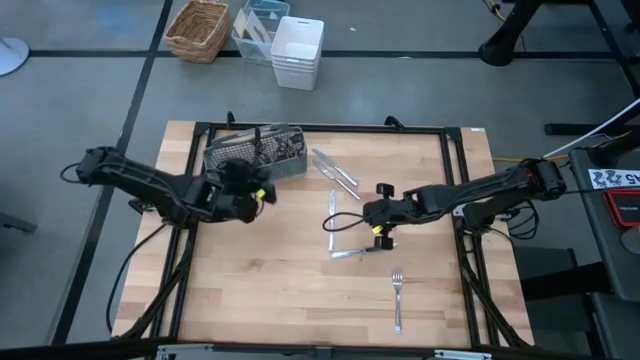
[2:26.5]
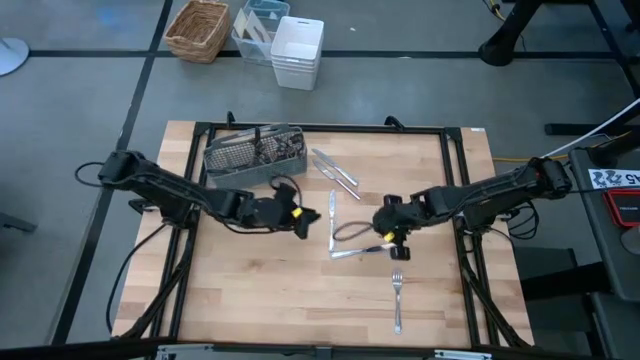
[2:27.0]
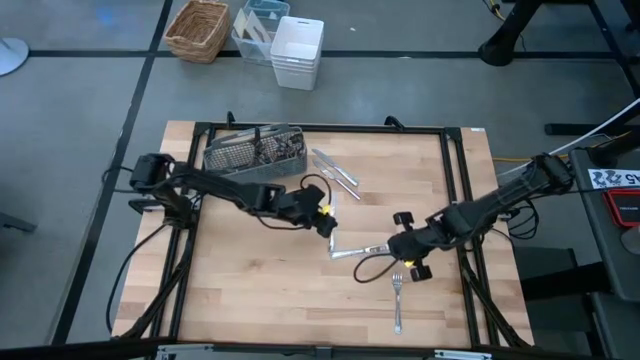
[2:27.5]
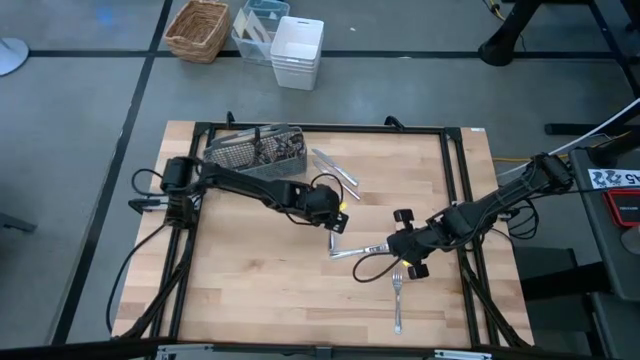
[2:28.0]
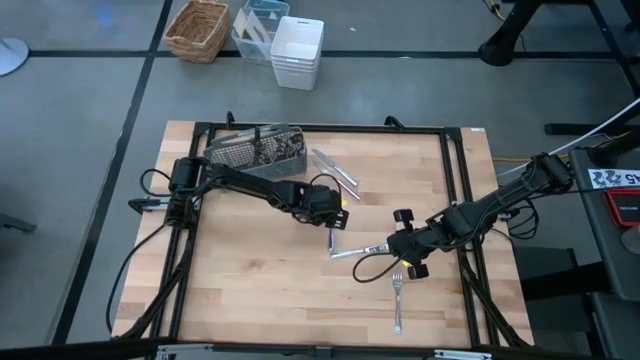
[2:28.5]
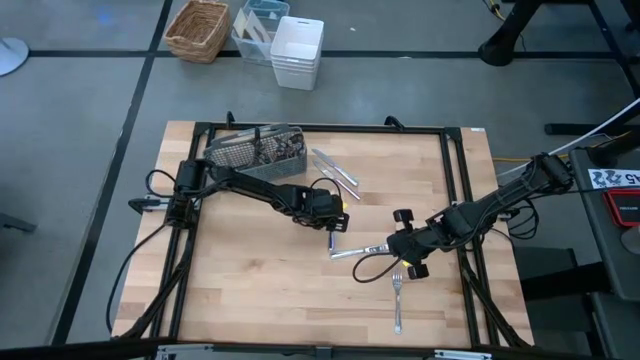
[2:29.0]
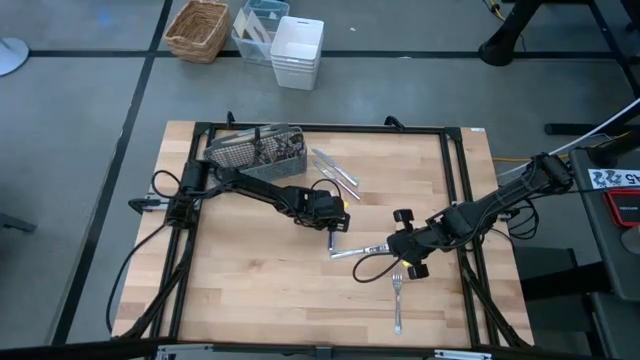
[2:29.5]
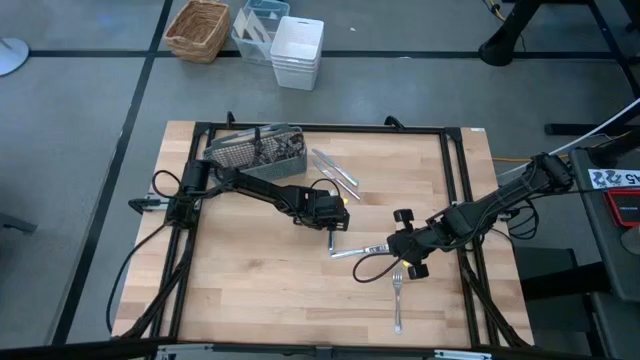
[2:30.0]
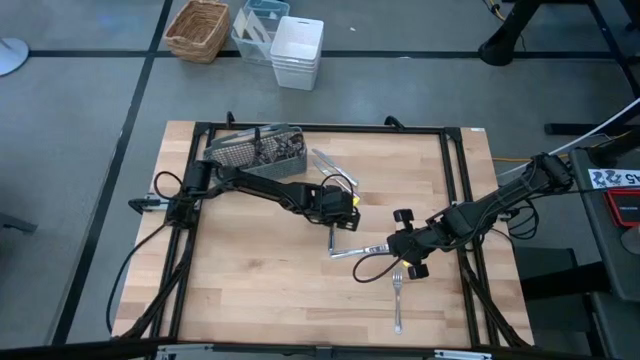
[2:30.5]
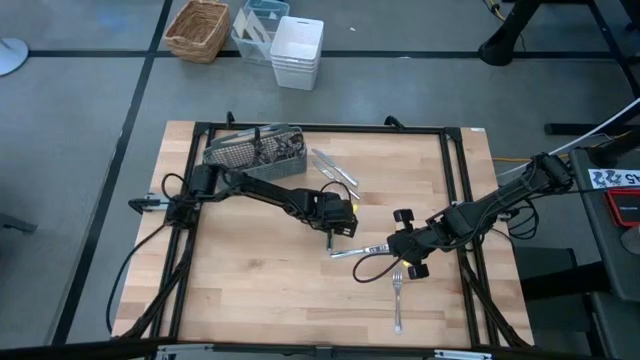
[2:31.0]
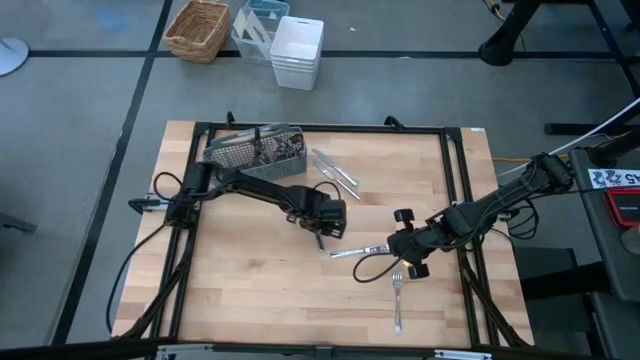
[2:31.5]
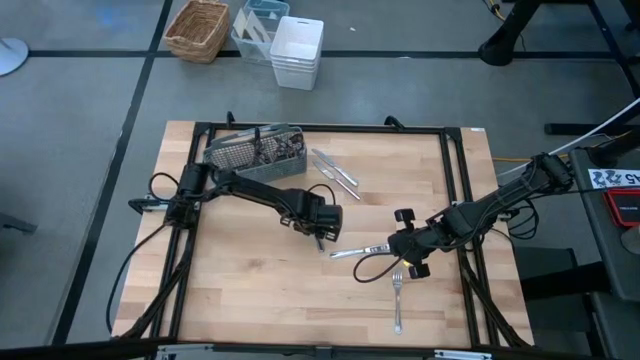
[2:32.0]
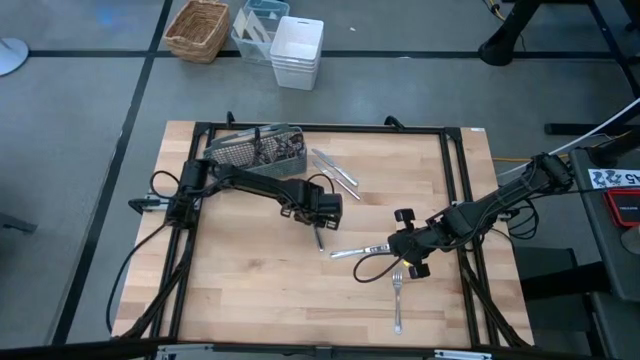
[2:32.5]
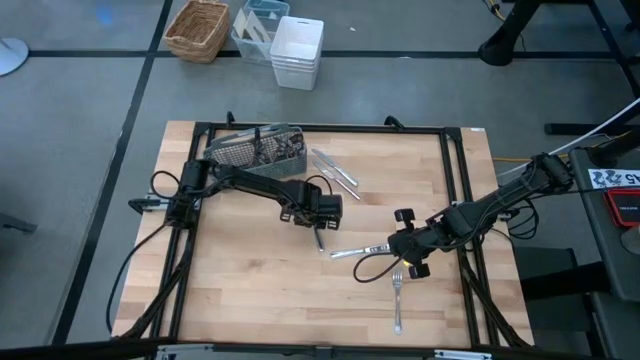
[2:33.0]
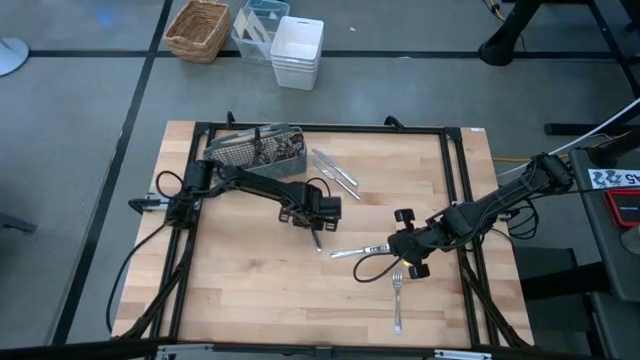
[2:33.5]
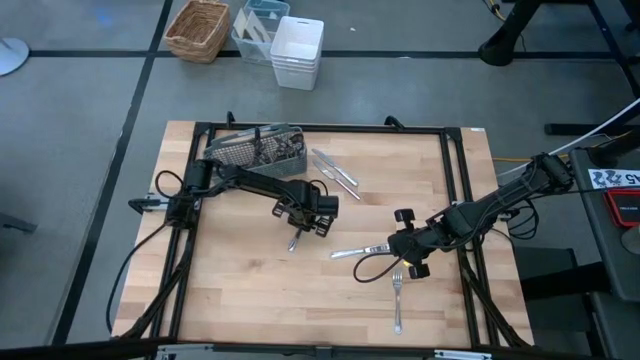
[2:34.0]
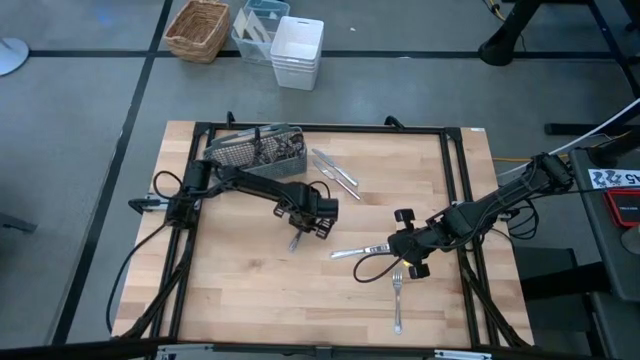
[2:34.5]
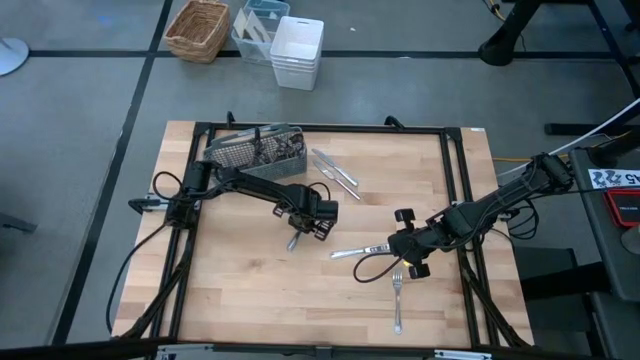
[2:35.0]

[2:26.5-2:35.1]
Task: Sort silverware
Put the silver table knife into the silverware rack

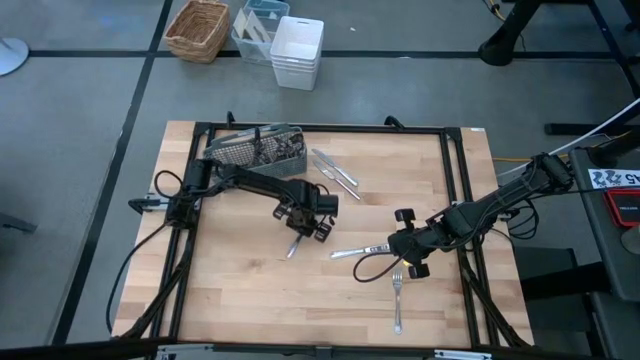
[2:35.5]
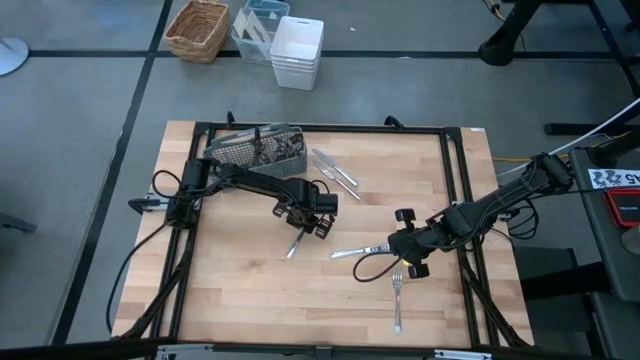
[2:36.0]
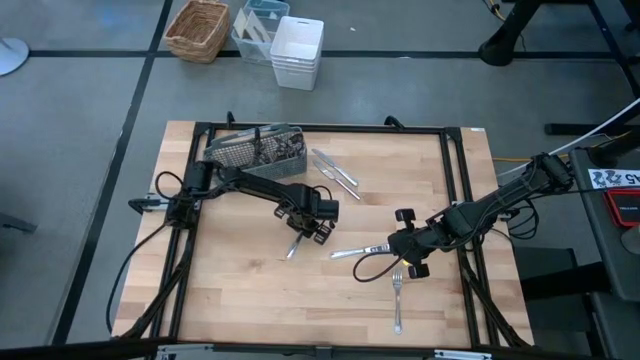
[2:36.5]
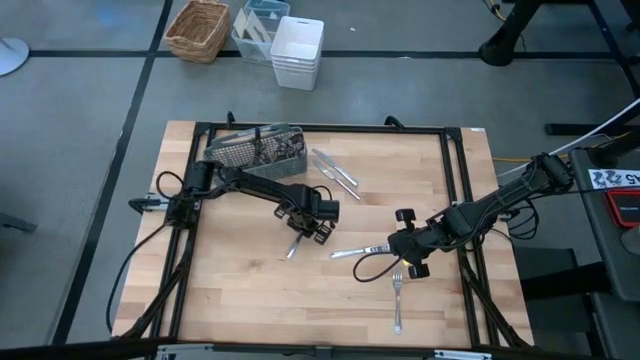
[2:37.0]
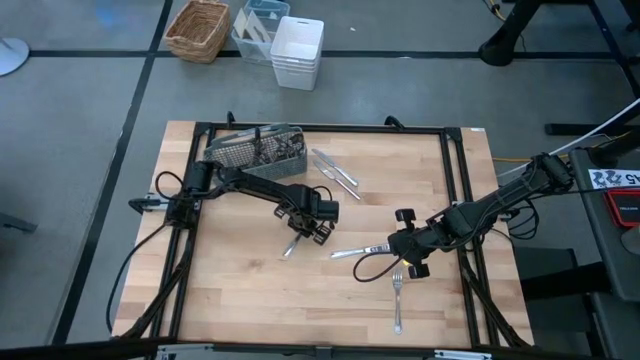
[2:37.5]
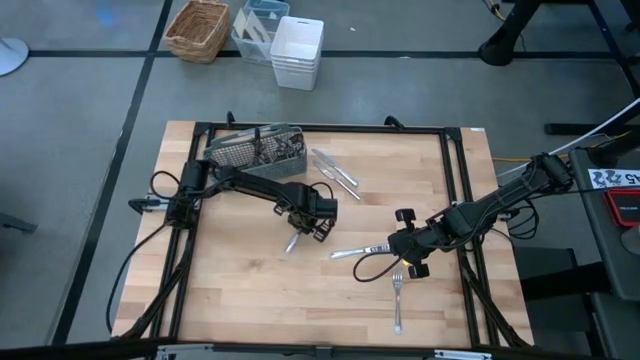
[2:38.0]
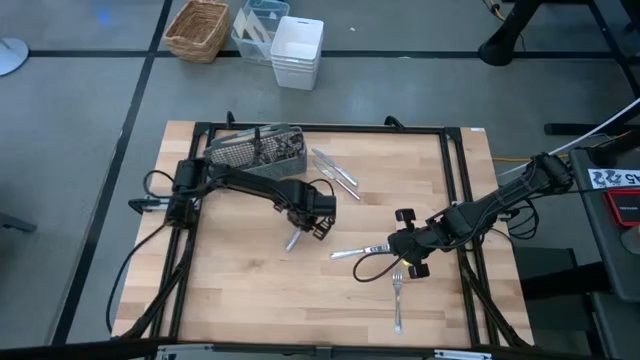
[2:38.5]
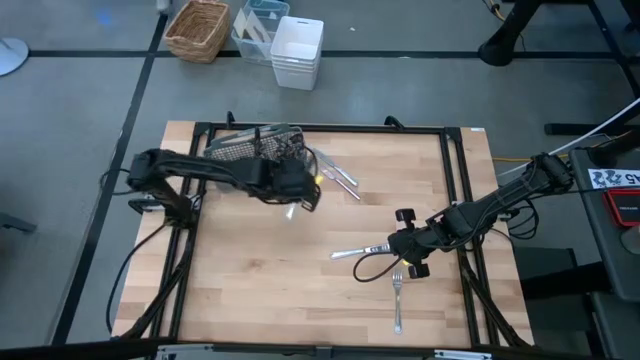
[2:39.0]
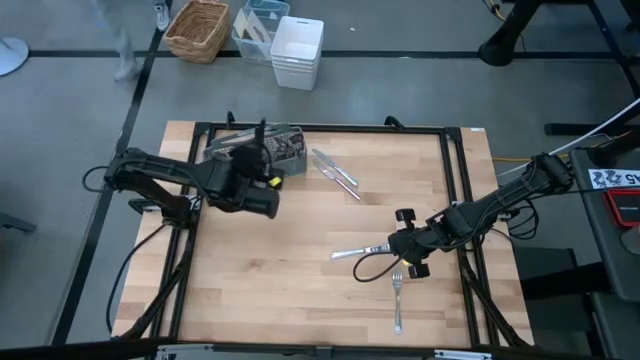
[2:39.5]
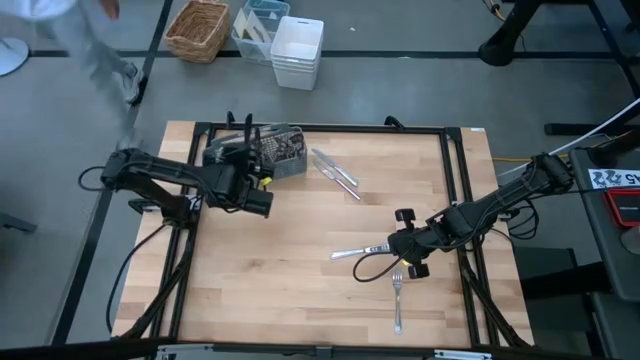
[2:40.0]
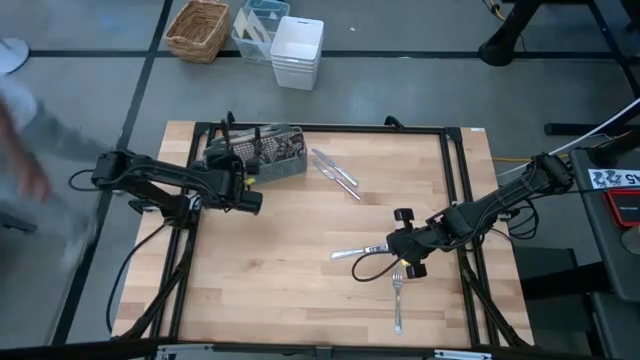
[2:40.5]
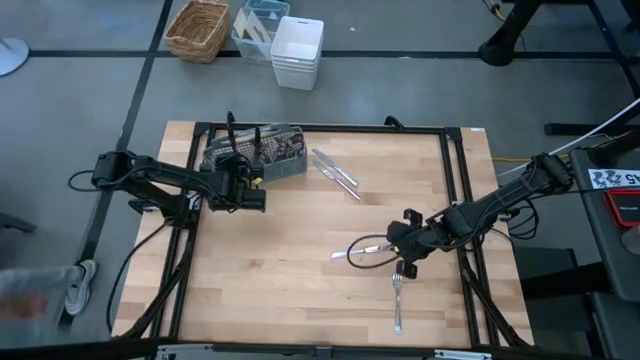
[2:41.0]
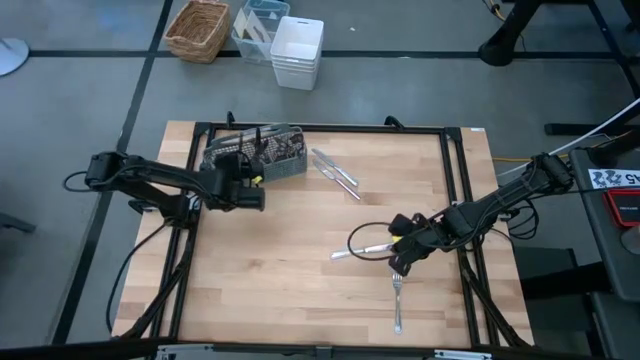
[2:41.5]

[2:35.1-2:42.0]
Put the silver table knife into the silverware rack

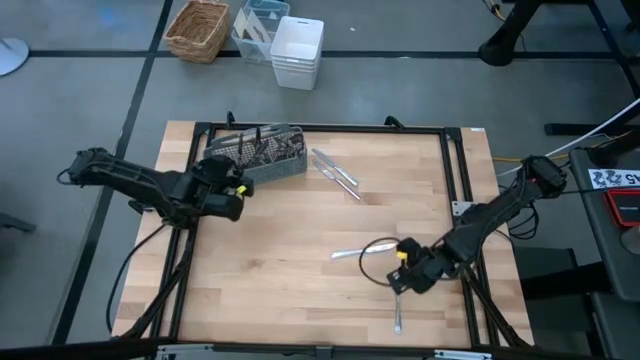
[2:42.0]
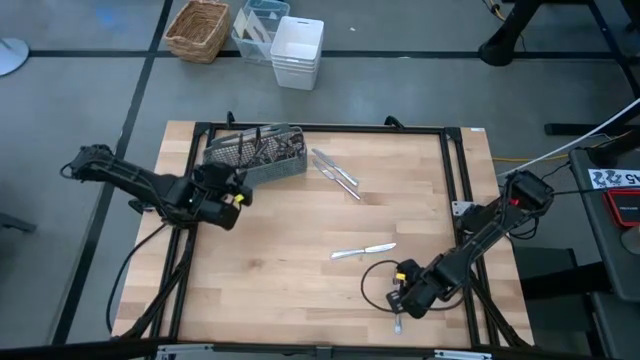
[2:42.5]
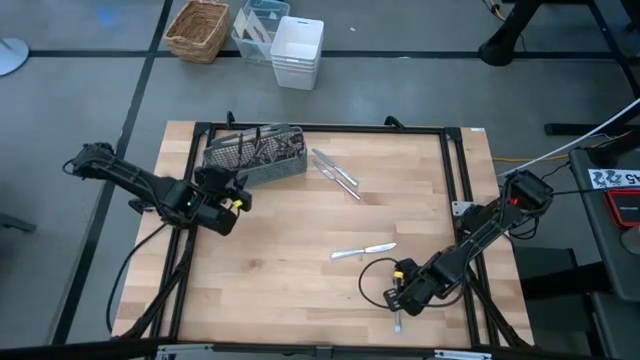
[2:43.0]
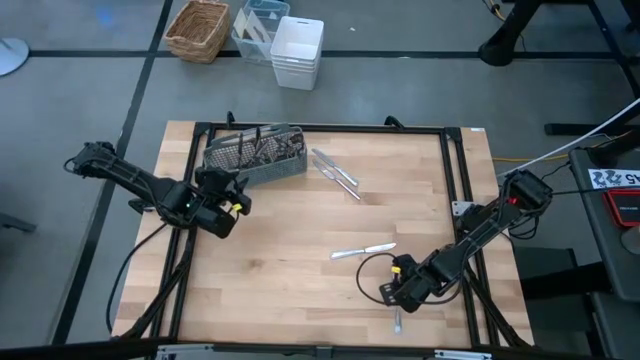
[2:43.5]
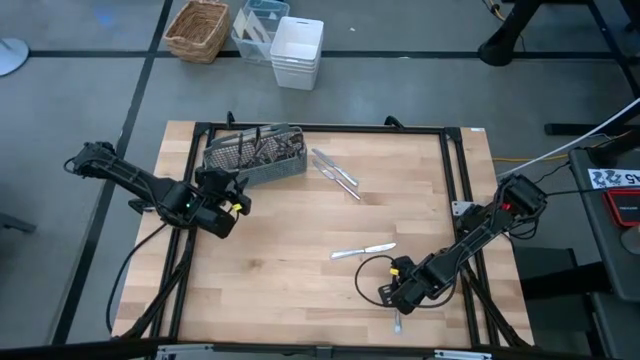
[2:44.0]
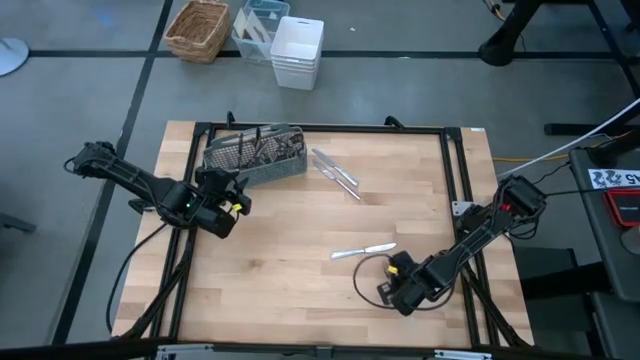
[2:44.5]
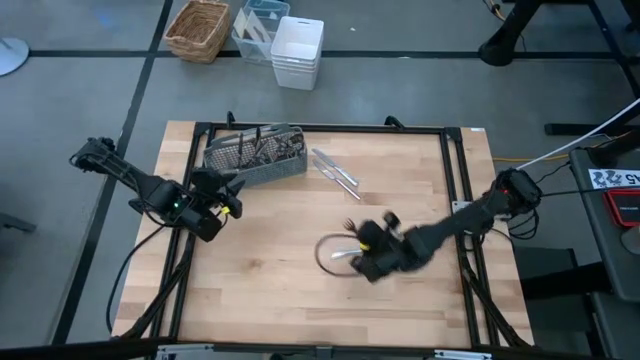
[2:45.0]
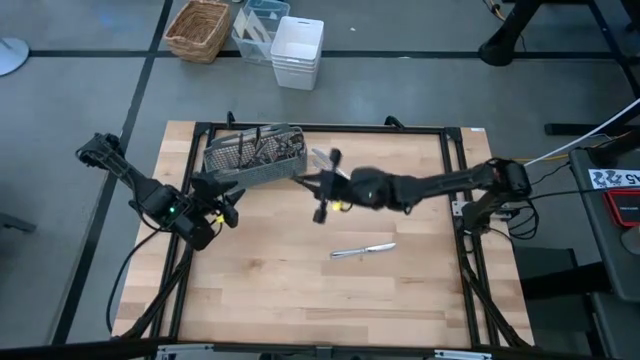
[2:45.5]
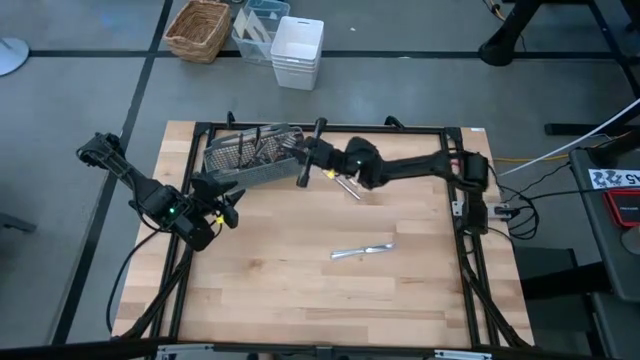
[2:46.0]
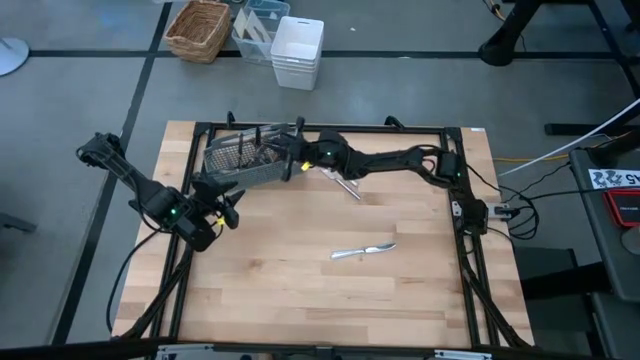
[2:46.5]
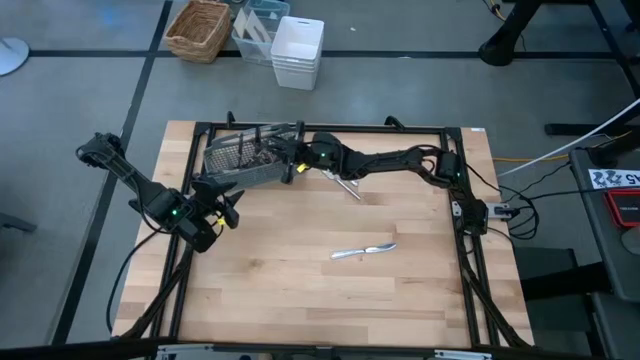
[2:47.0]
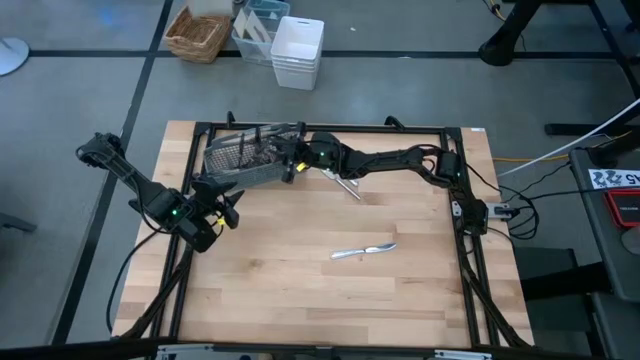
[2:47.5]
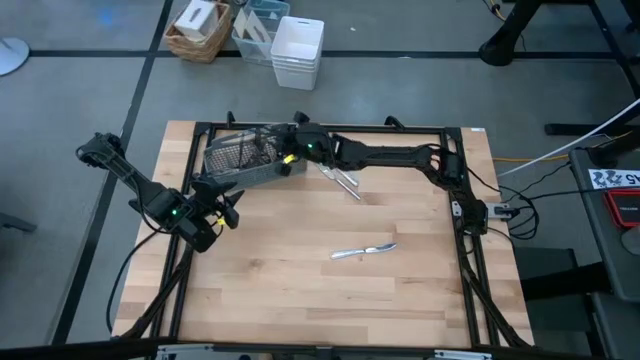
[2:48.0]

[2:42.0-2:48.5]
Put the silver fork into the silverware rack

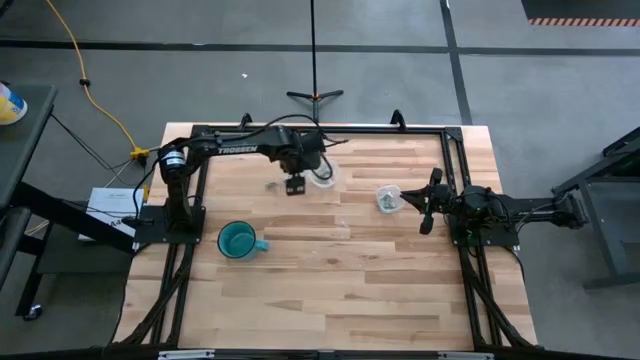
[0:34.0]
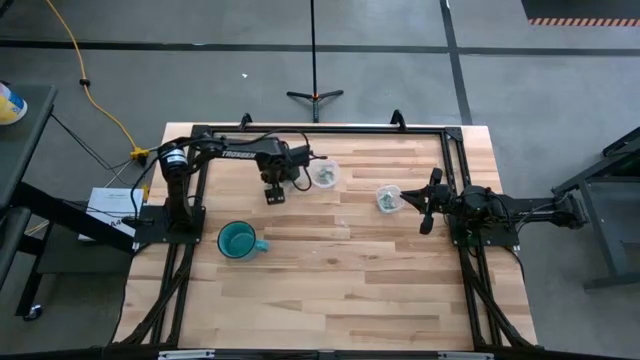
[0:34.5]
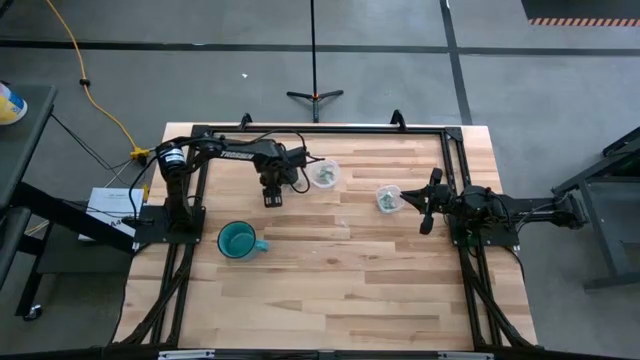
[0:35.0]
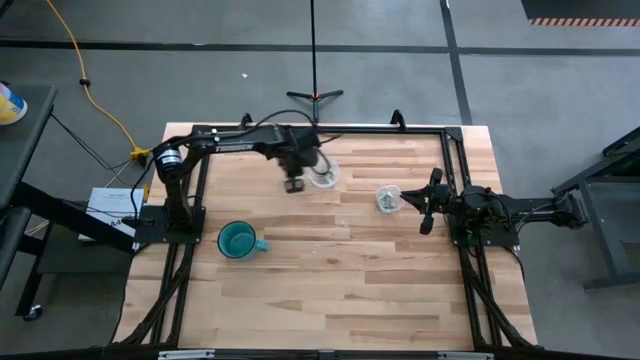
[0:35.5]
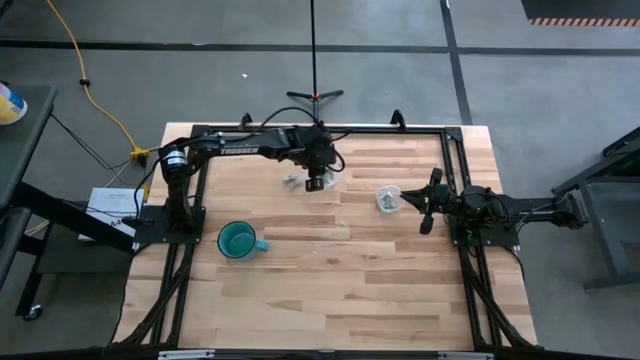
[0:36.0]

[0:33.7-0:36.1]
Task: Pick and place items into bin
Put the stevia packet into the top transparent bin
